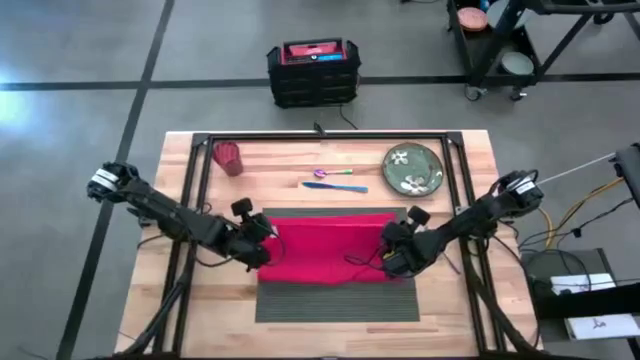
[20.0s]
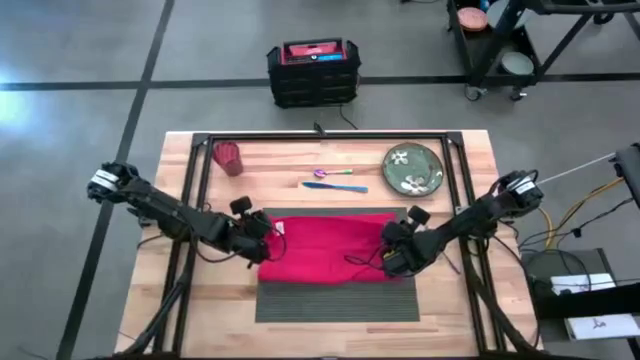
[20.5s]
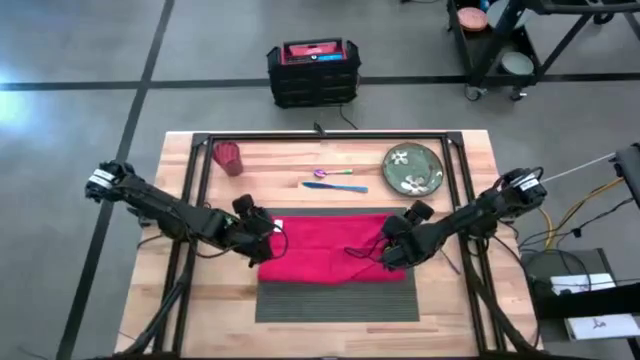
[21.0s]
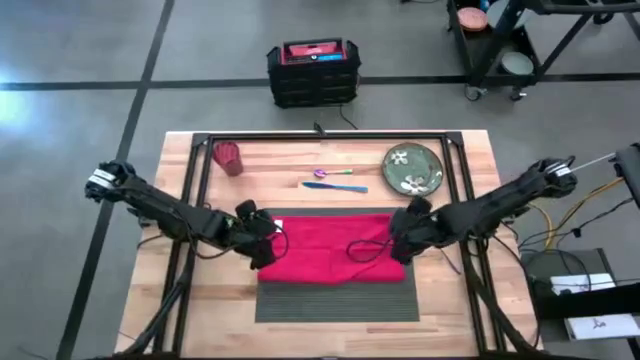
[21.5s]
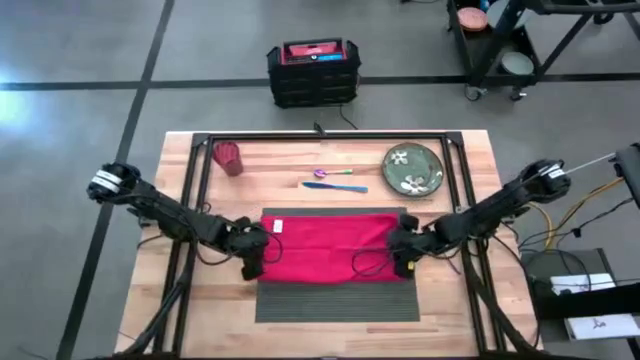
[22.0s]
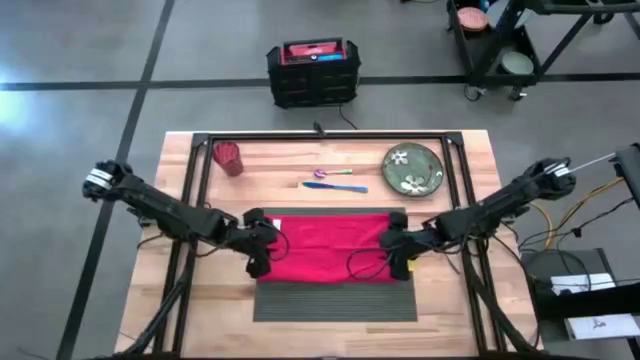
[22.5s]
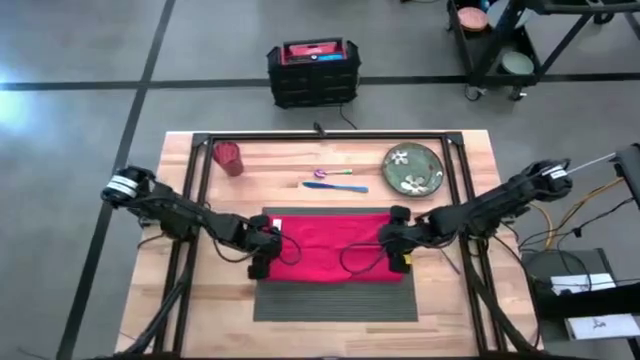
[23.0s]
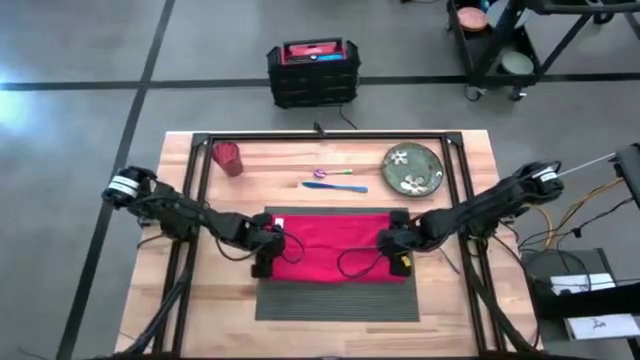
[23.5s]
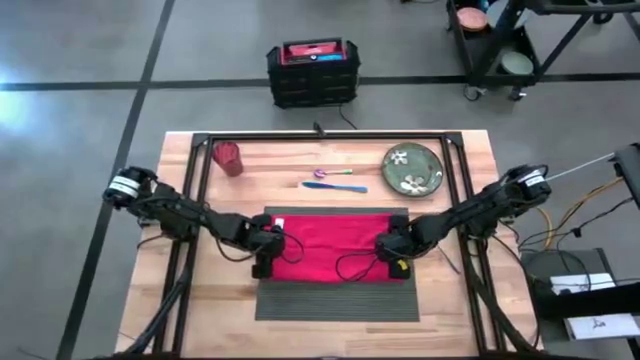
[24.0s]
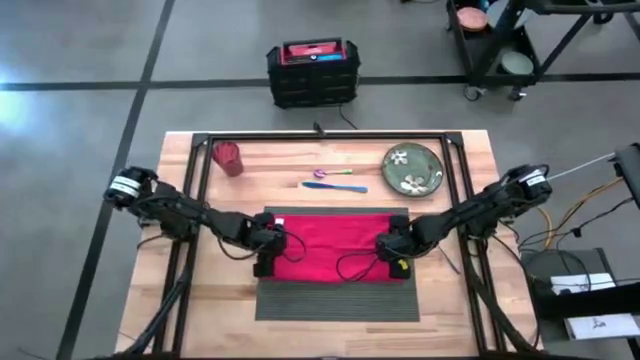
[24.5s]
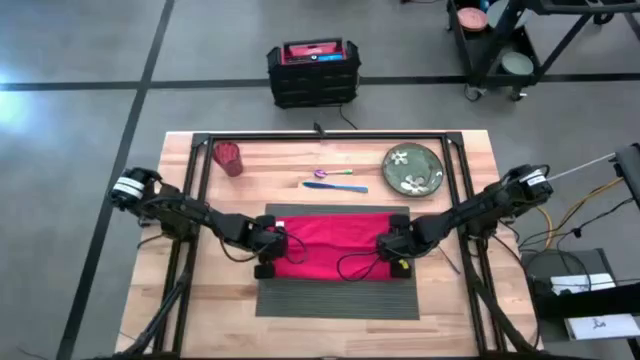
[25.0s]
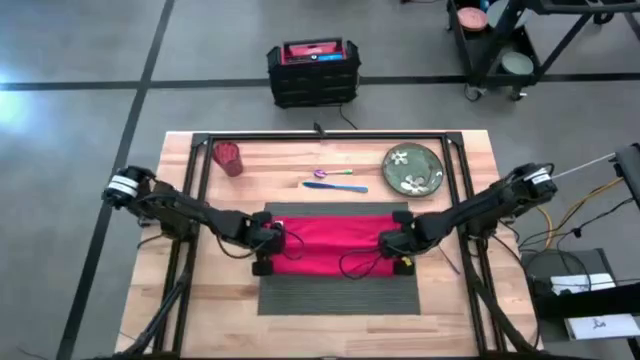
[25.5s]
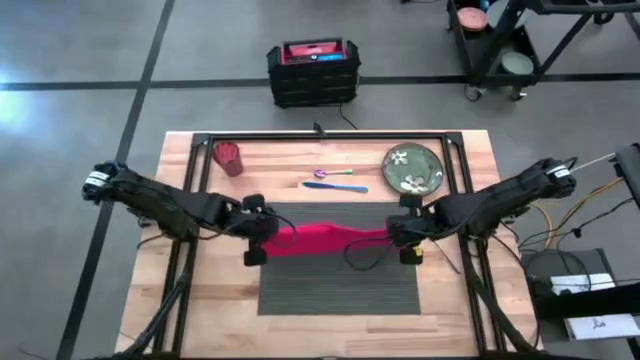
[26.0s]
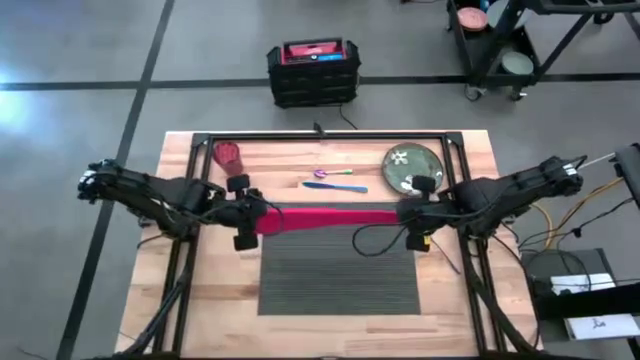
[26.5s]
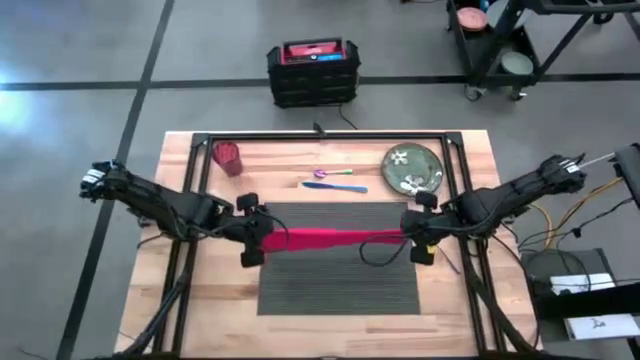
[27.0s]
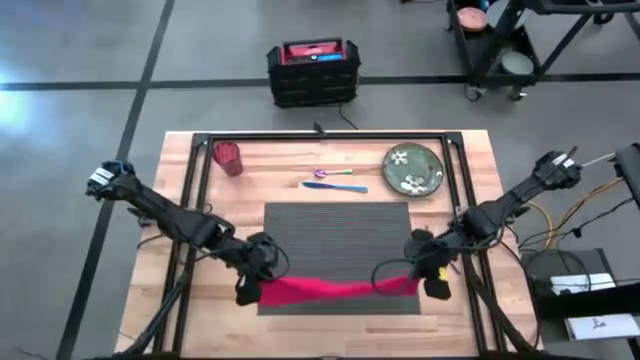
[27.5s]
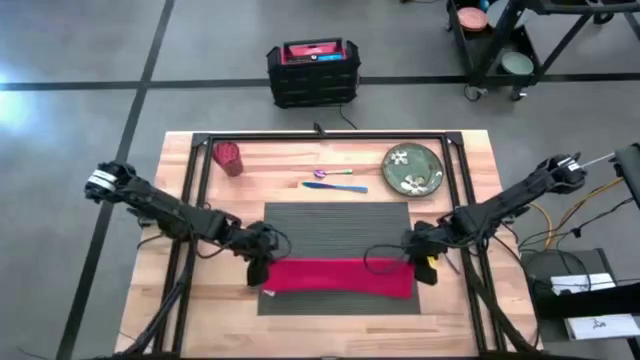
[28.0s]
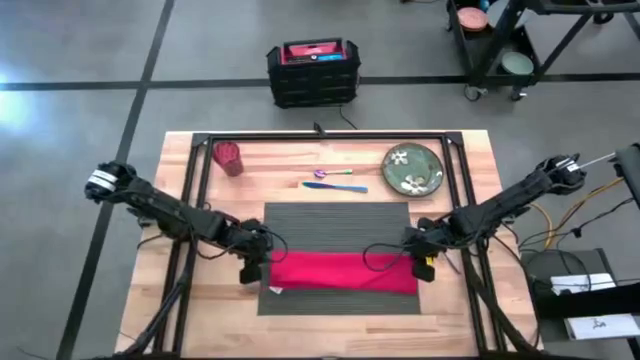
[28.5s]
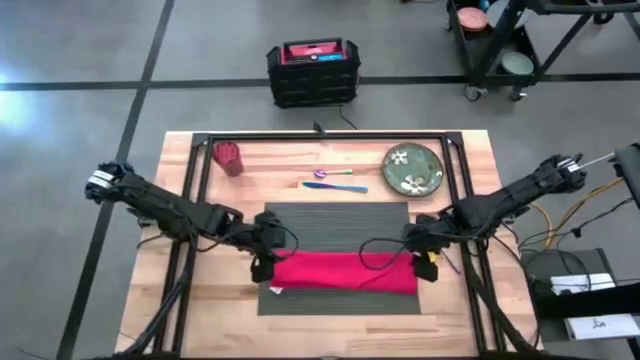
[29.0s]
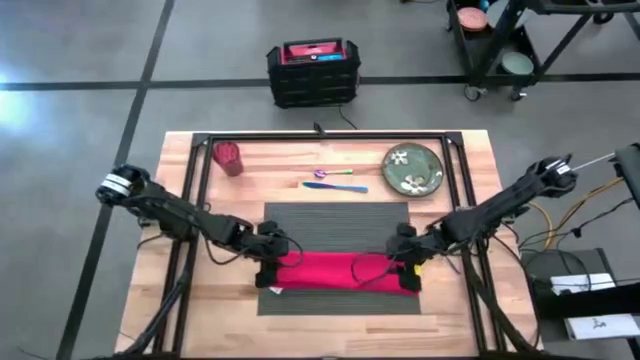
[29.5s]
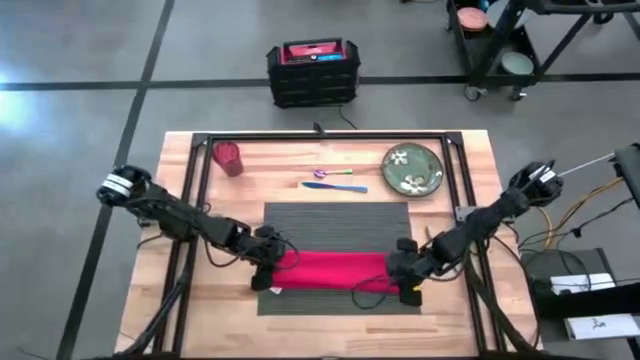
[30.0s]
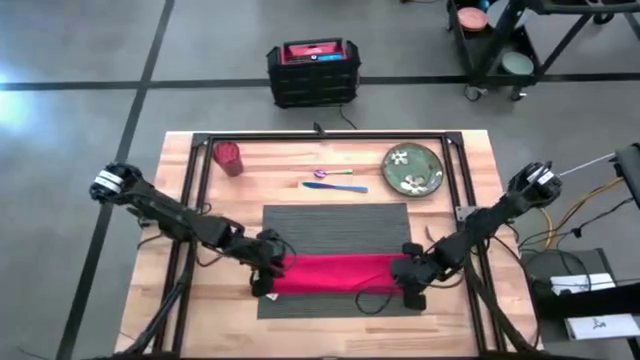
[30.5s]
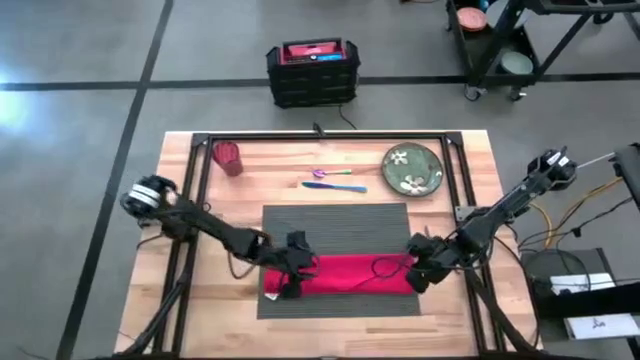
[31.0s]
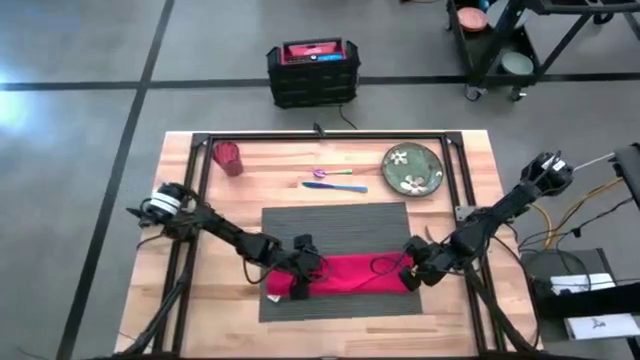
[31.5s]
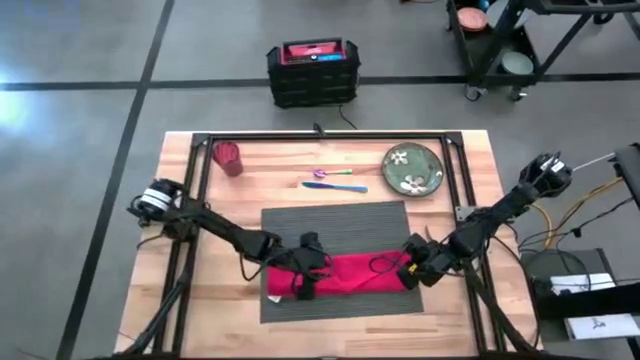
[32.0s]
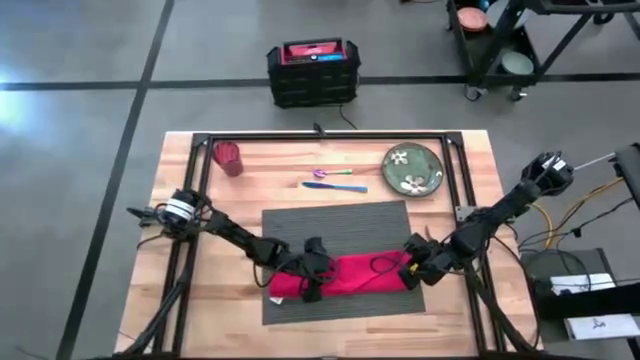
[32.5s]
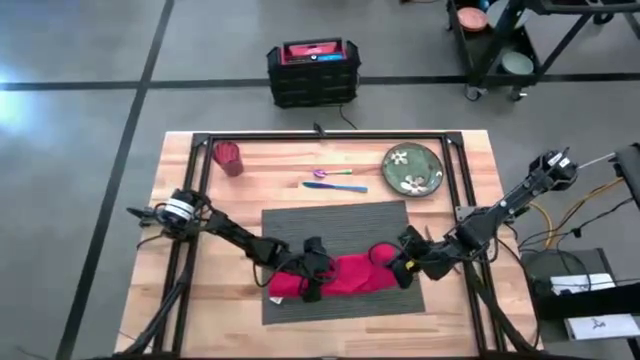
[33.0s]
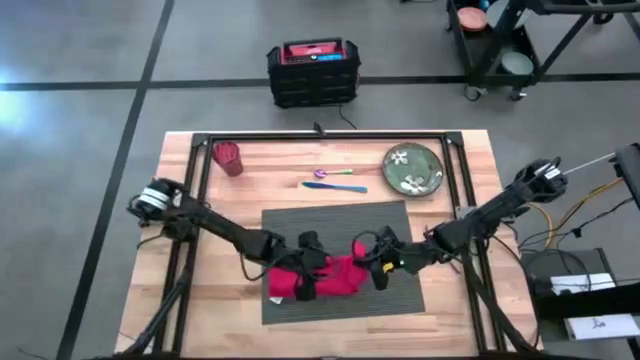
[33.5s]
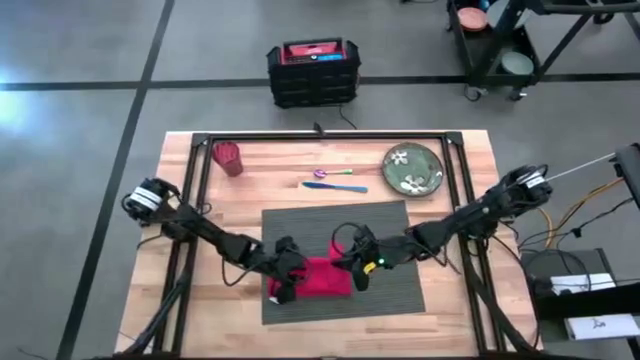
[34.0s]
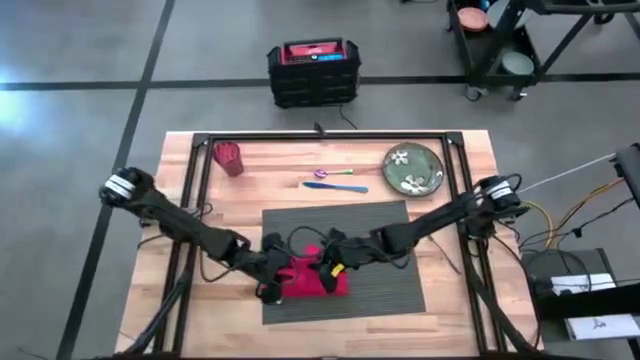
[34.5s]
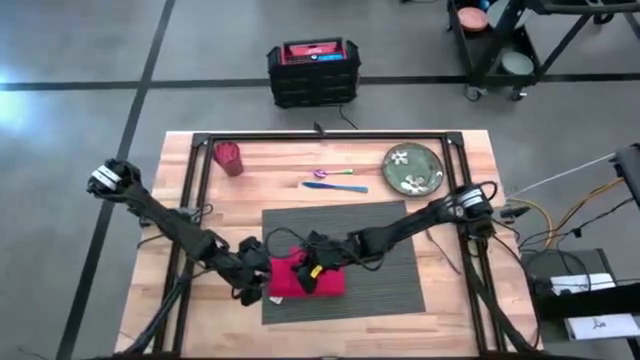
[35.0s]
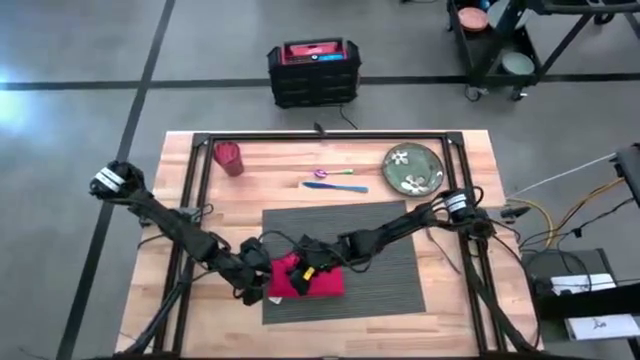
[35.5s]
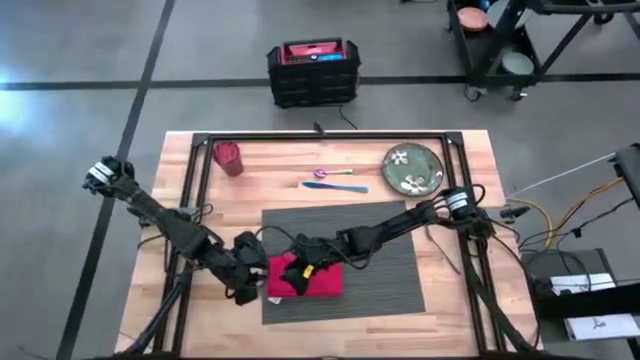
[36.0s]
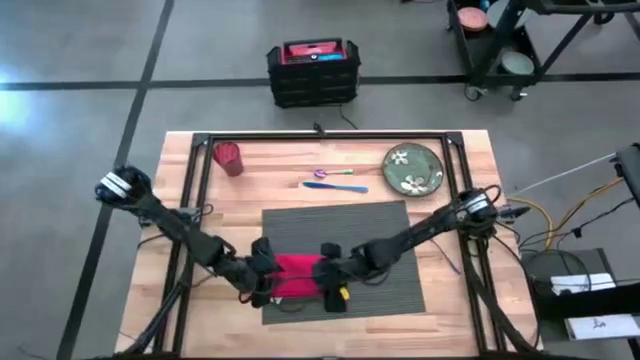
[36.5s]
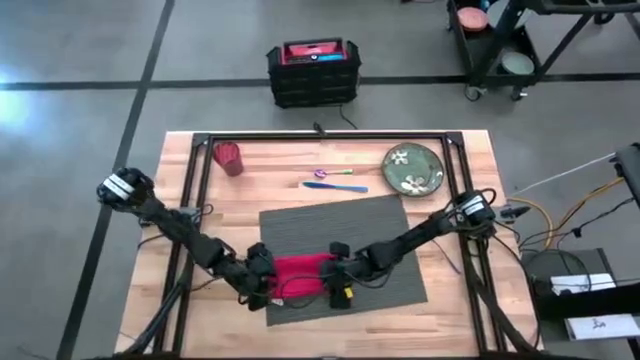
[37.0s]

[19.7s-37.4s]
Task: Set table place
Fold the red napkin

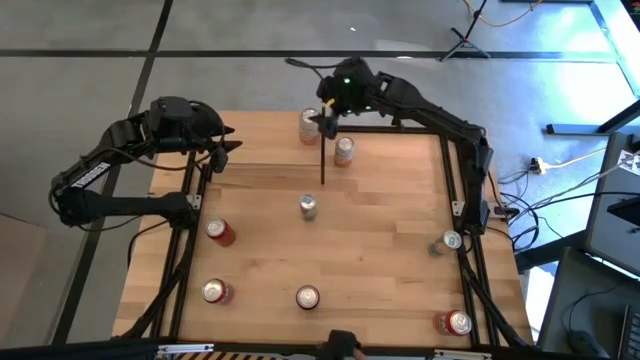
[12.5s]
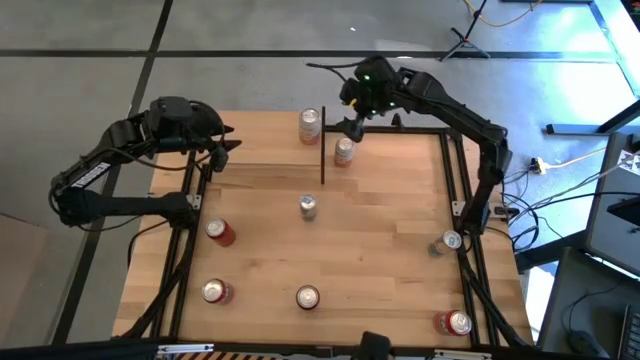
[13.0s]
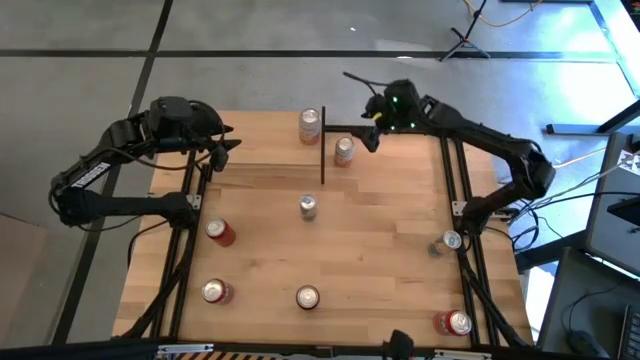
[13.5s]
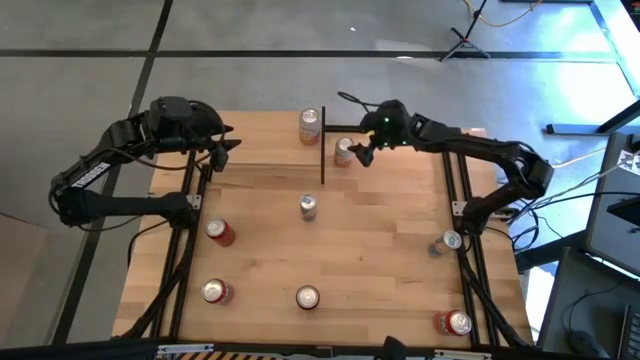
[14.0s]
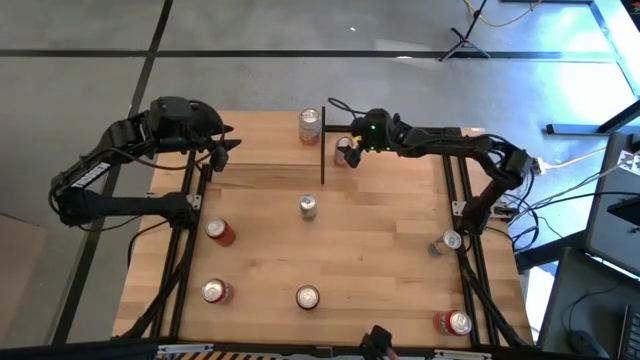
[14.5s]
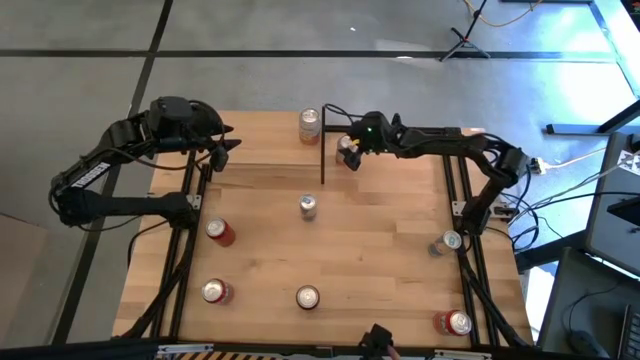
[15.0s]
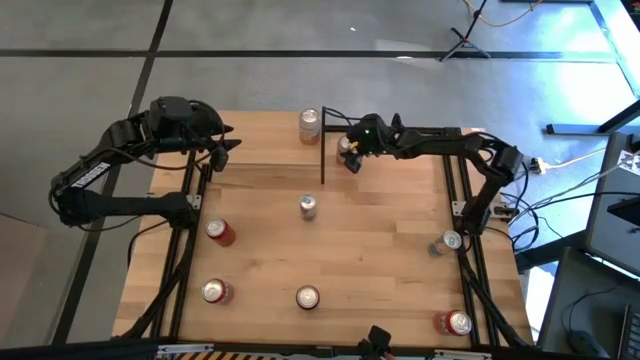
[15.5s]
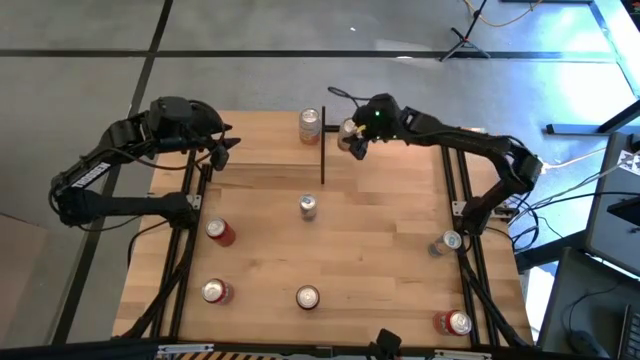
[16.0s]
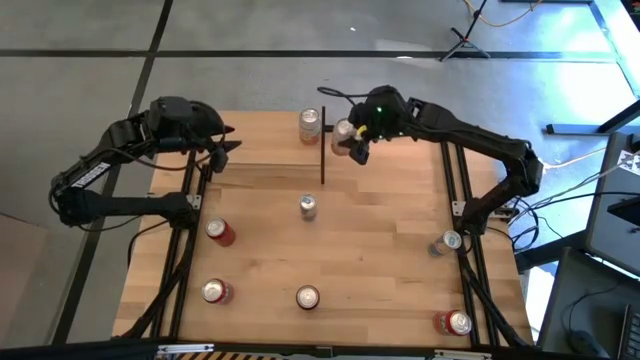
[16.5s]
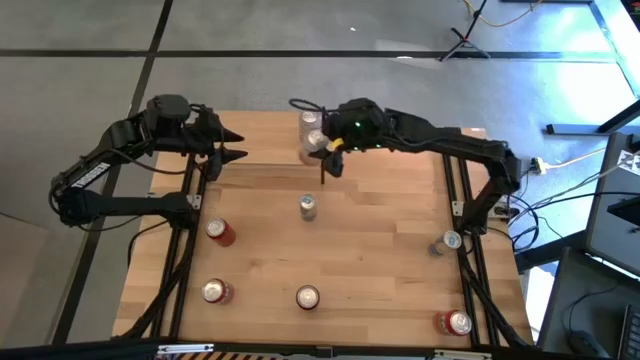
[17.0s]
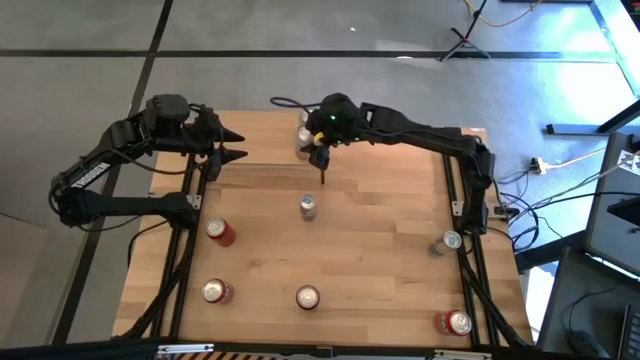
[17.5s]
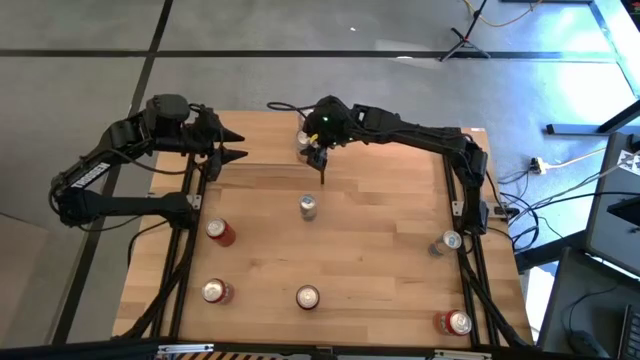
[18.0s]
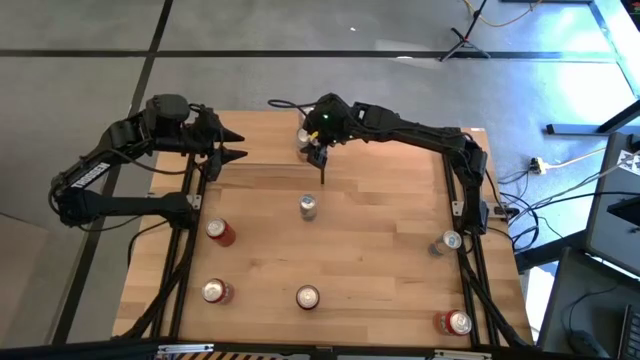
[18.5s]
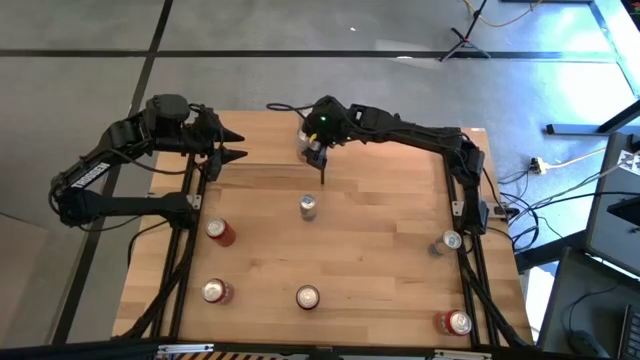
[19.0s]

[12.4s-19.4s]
Task: Place canned beverage on shelf
Put the light pink soda can on the shelf aligned with the other light pink soda can
